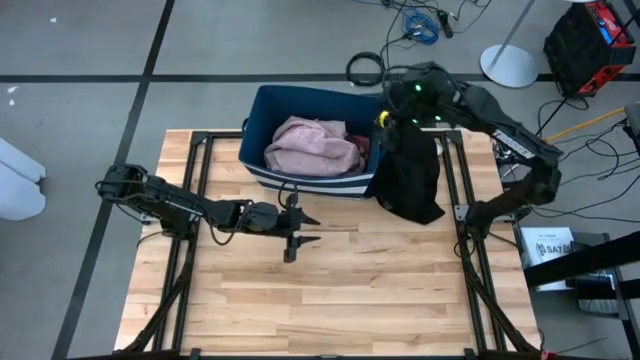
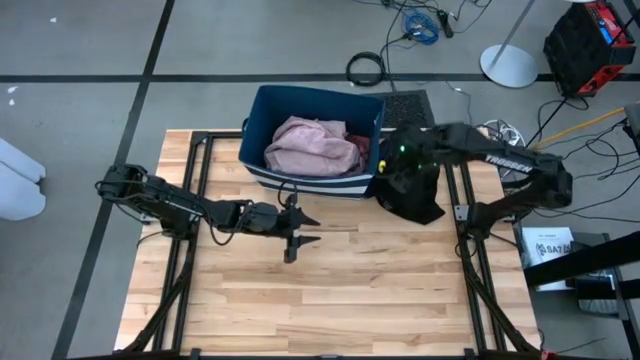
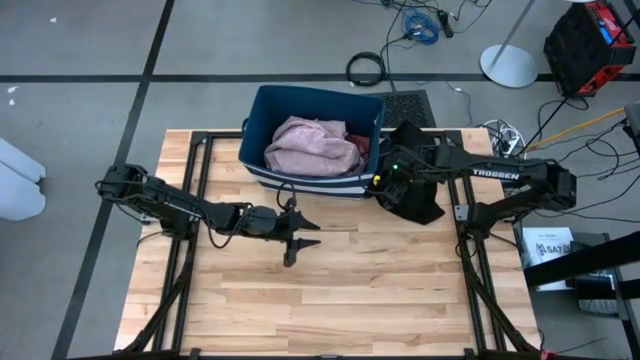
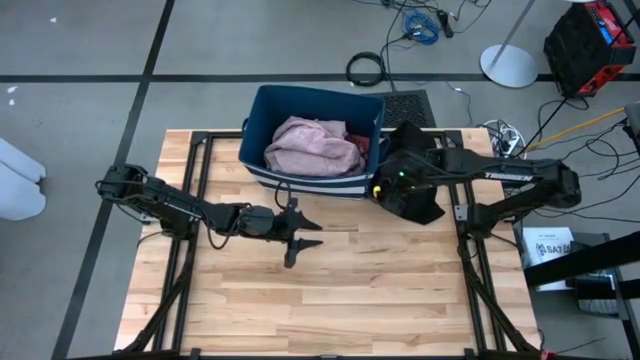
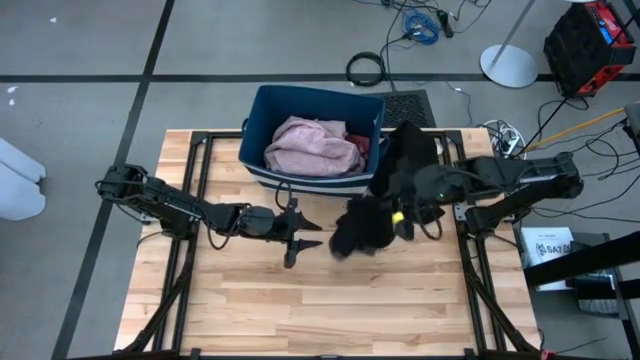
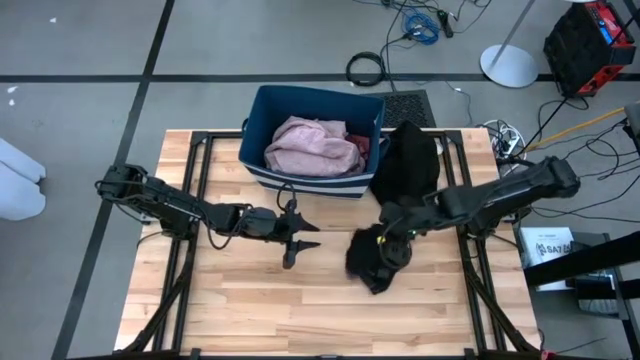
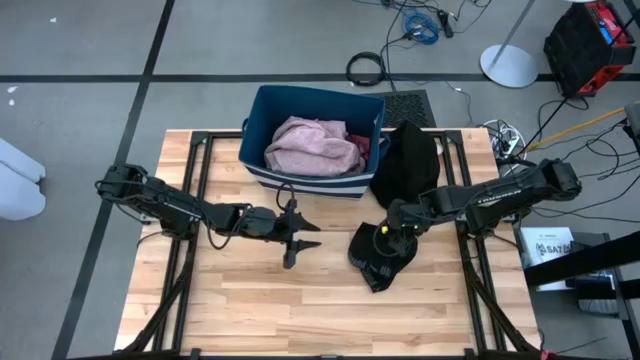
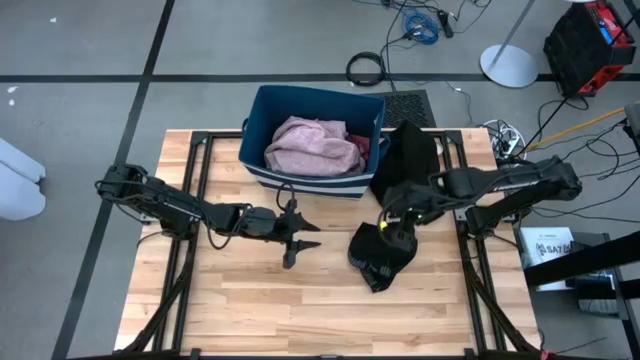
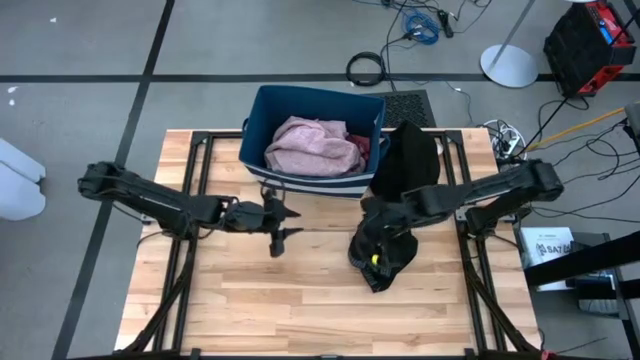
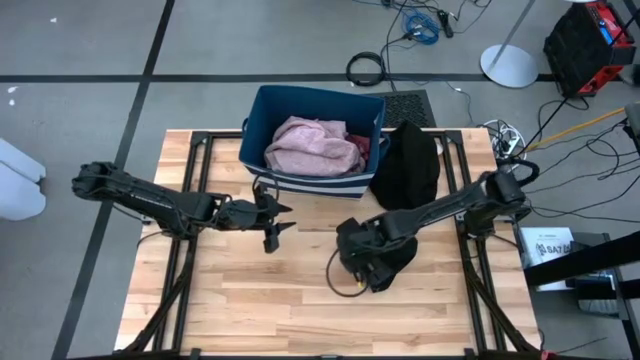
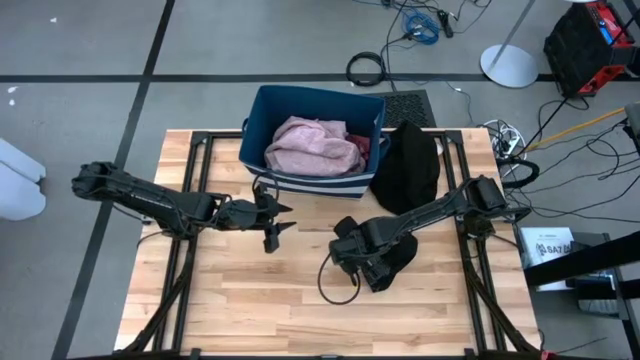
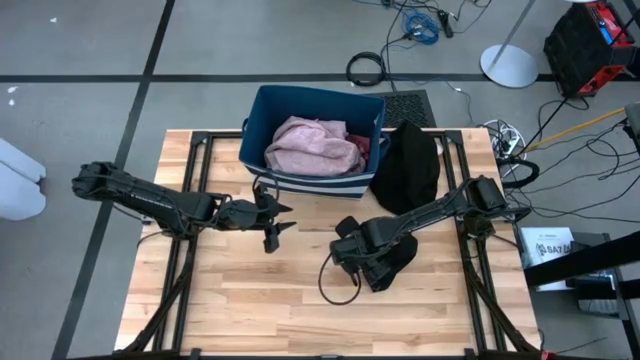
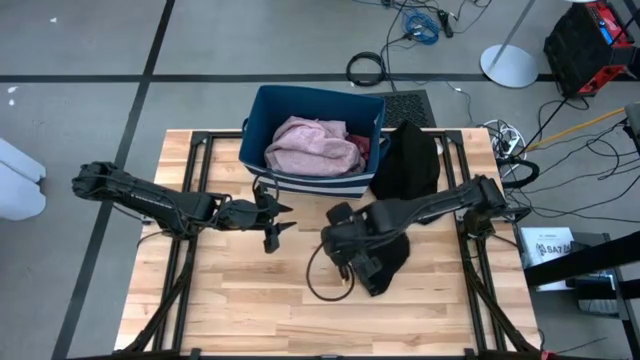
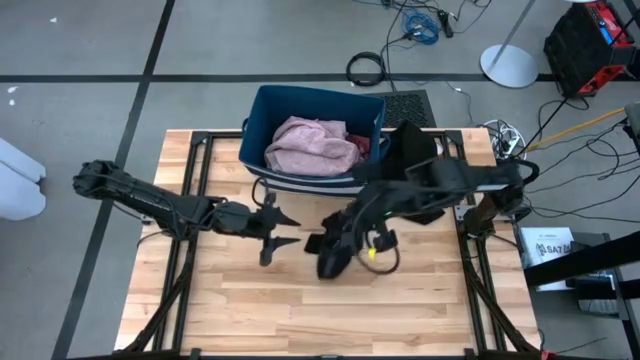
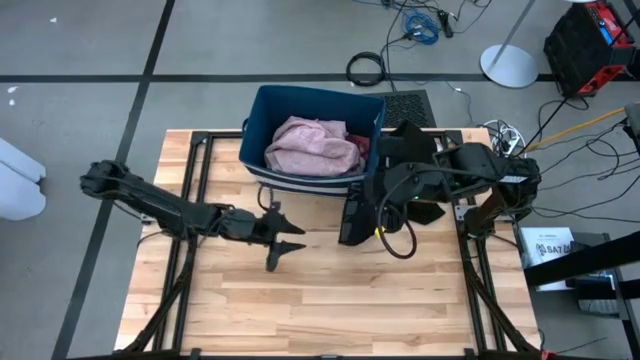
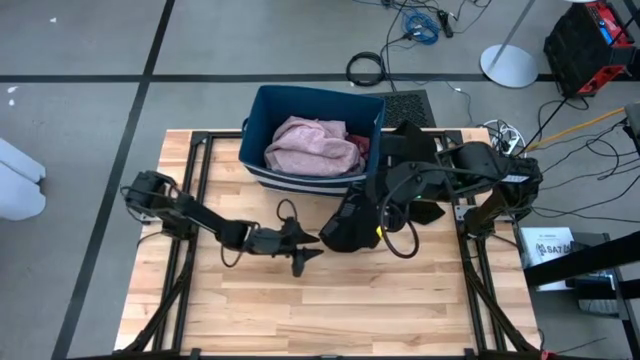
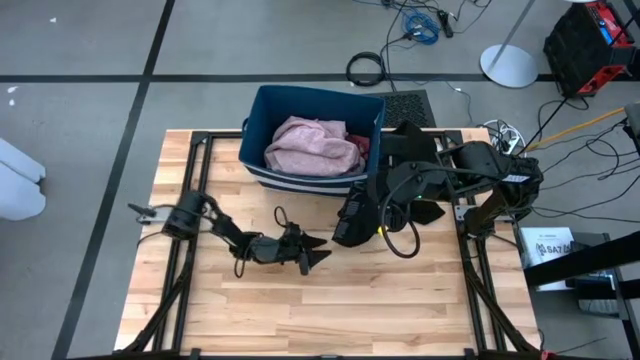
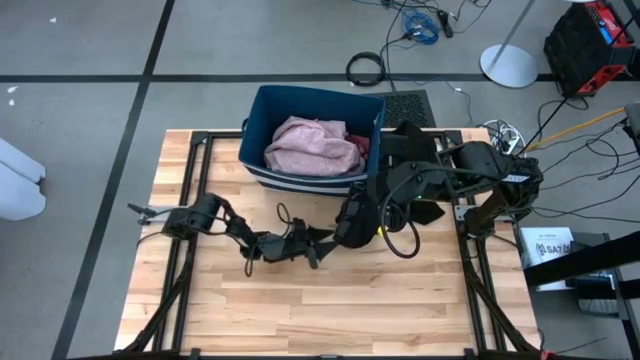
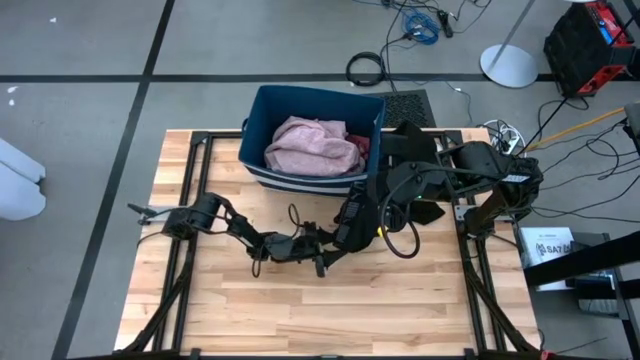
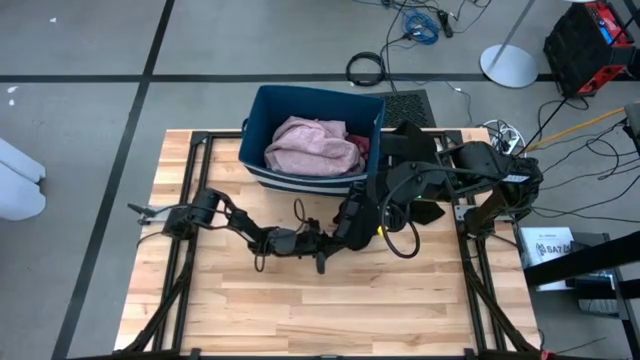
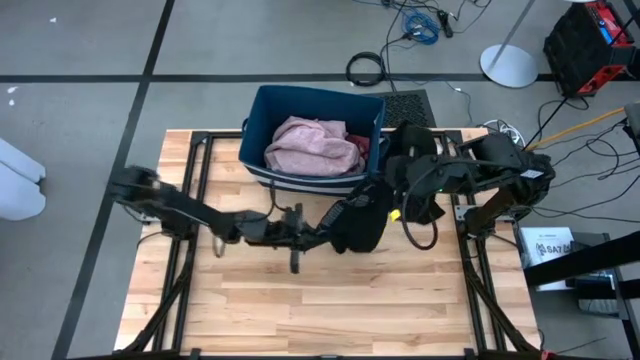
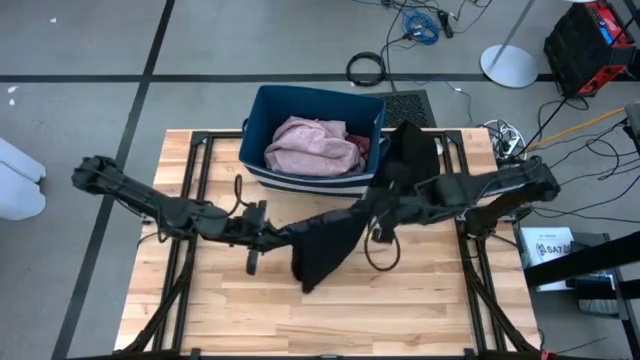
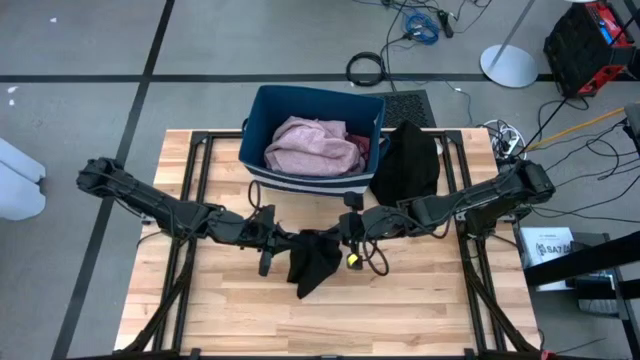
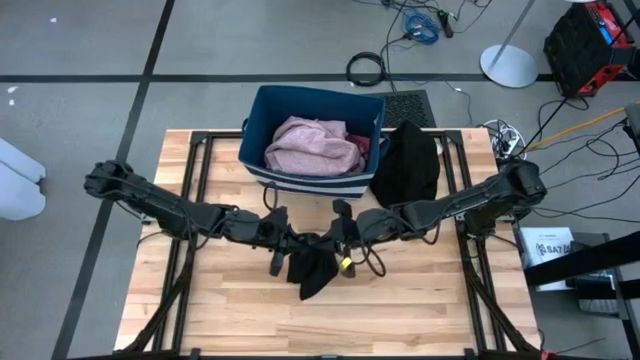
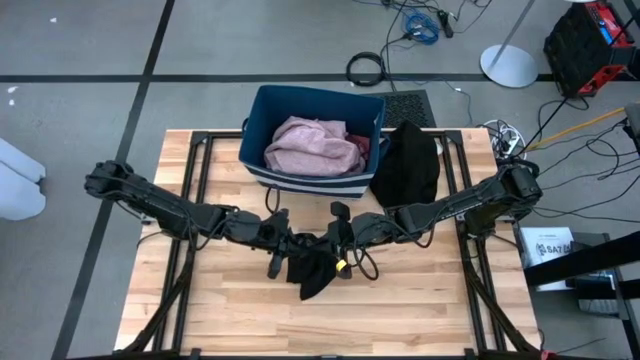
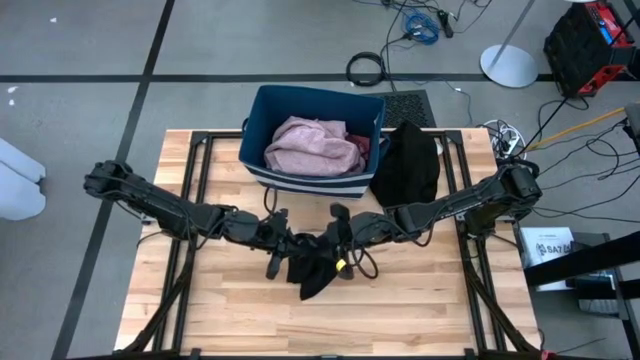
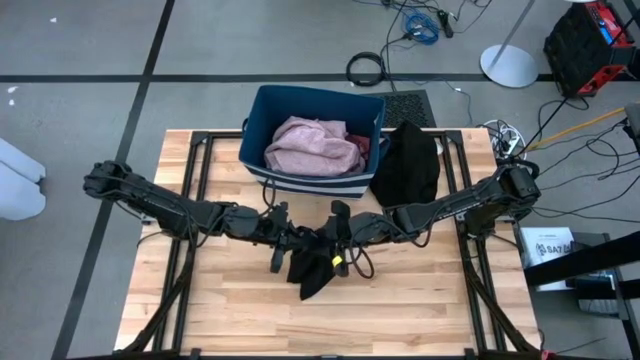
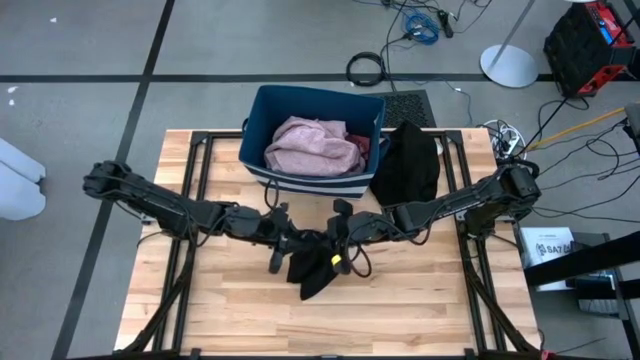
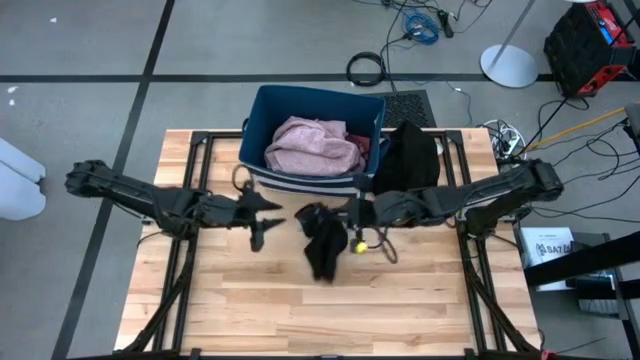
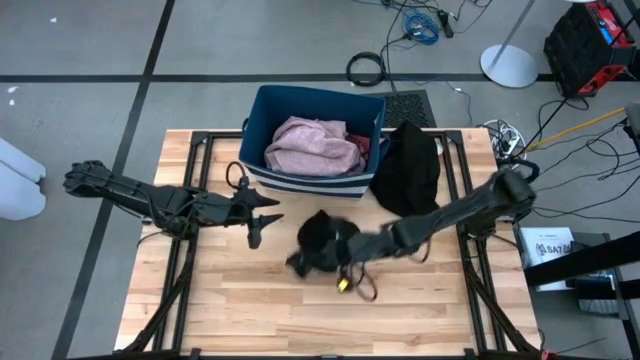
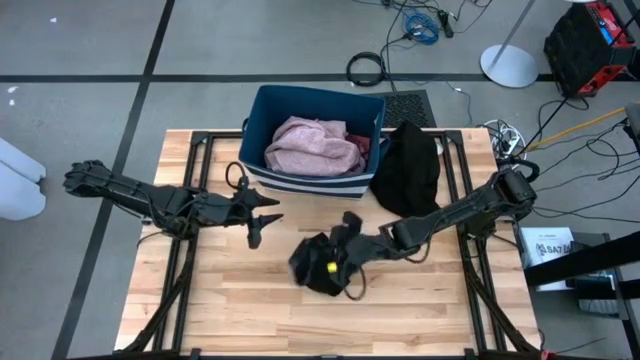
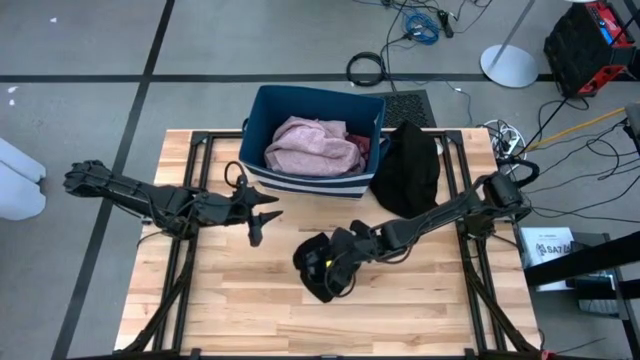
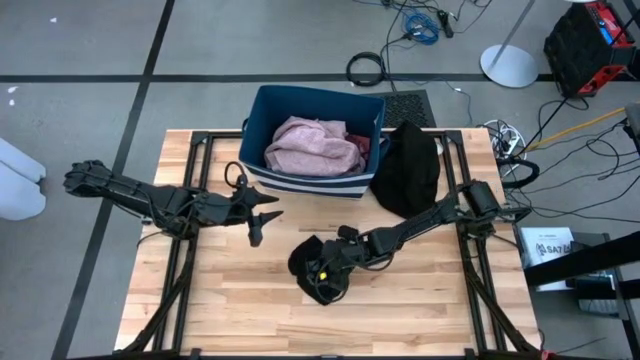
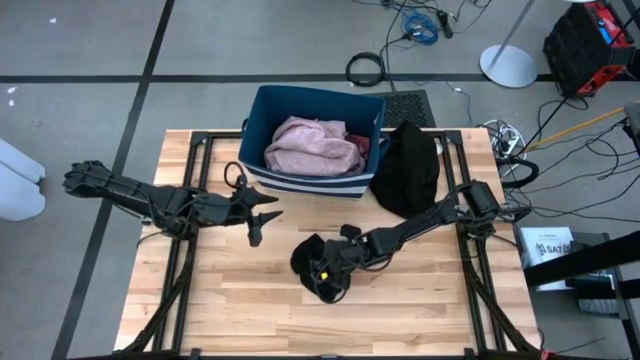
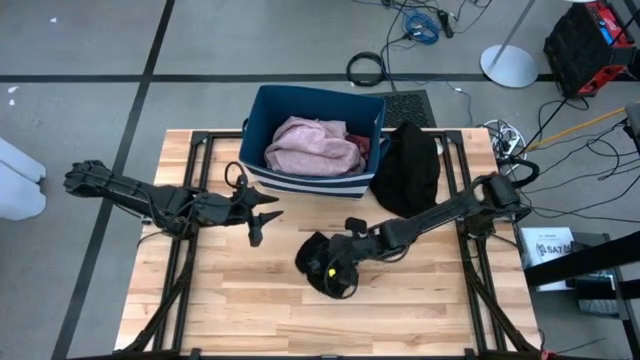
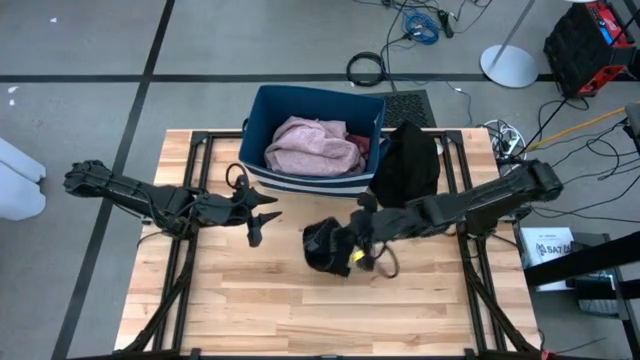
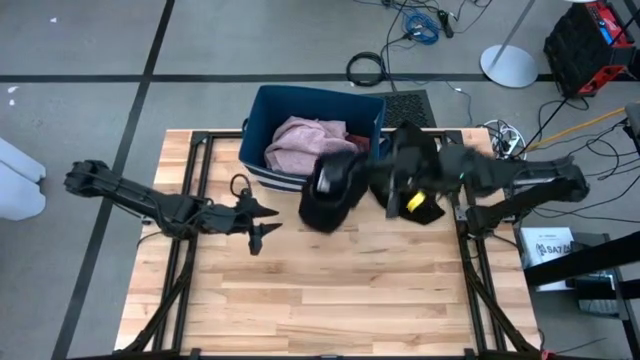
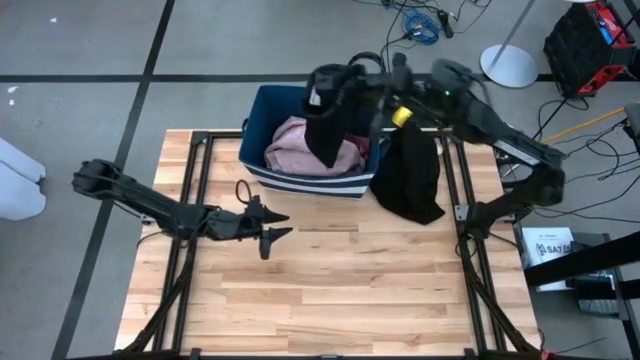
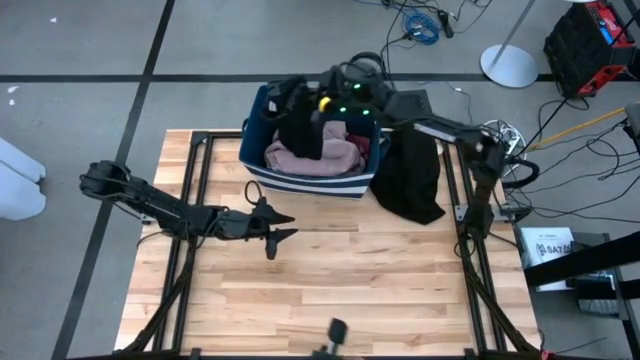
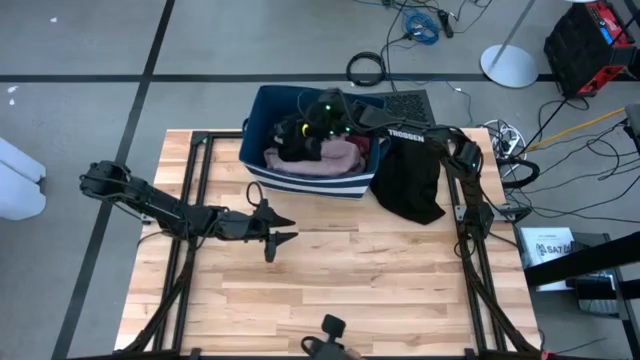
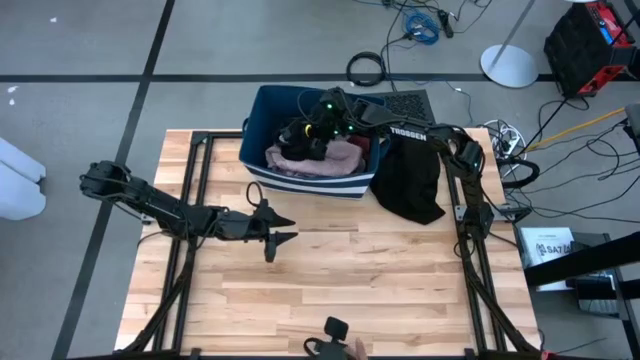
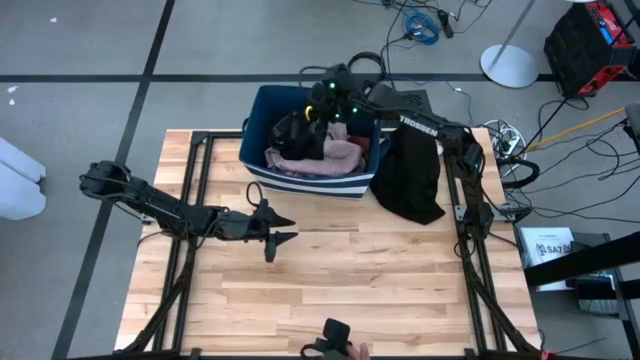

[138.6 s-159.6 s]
Task: Sort clothes
Put the black boxer into the blue laundry organizer

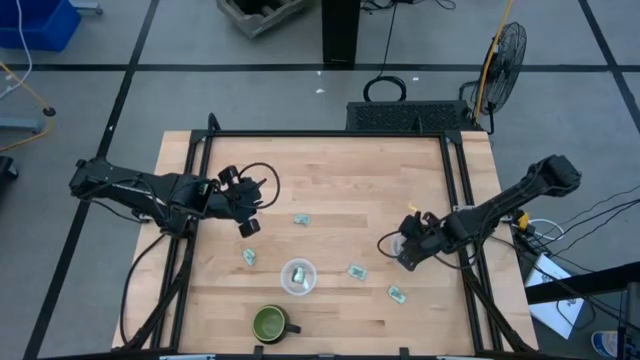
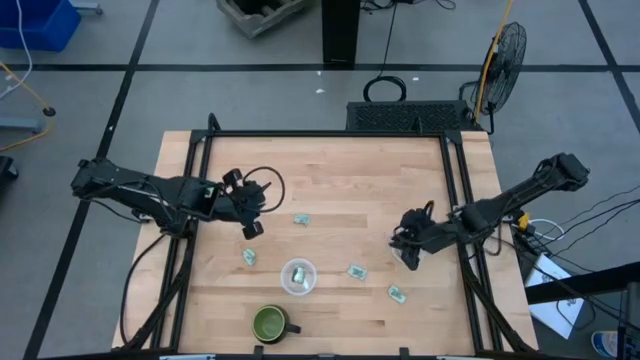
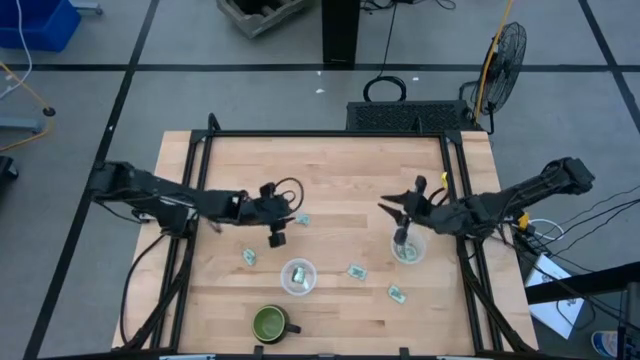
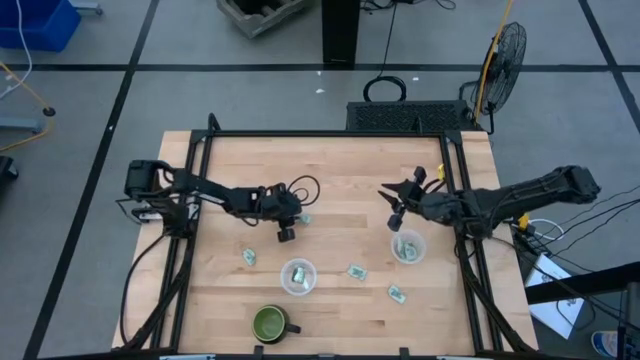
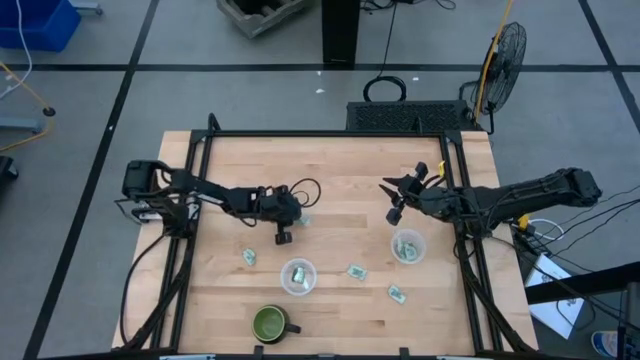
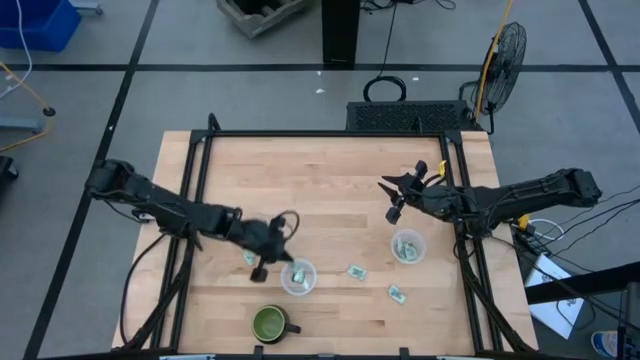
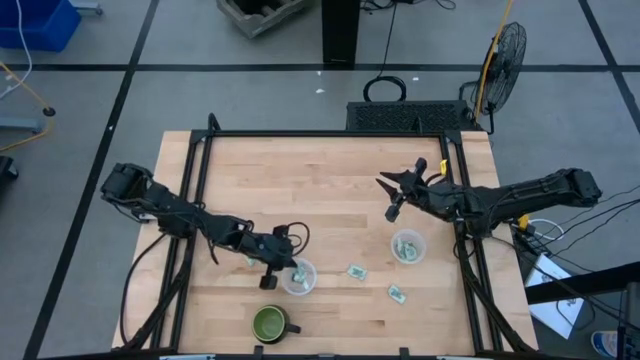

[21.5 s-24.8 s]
Task: Pick and place Stevia / Truvia into bins
Put the white stevia packet into the left transparent container
